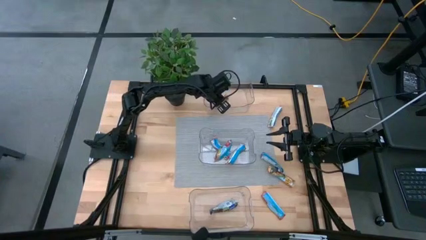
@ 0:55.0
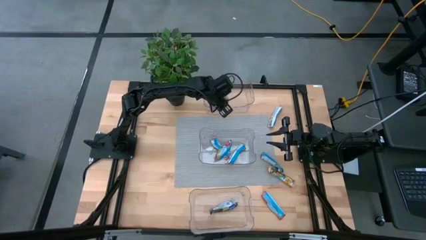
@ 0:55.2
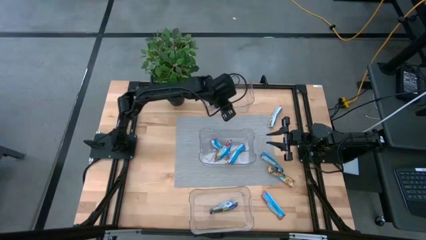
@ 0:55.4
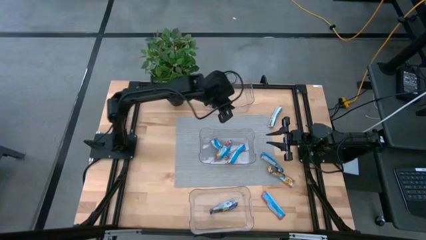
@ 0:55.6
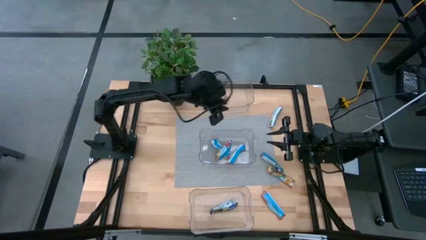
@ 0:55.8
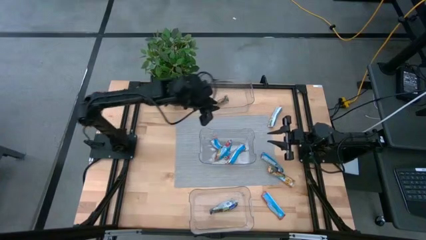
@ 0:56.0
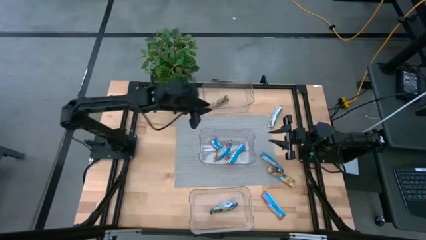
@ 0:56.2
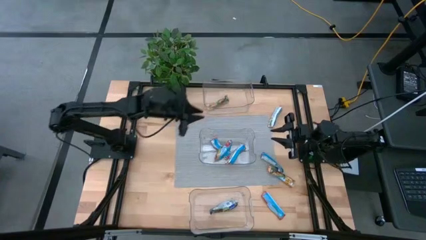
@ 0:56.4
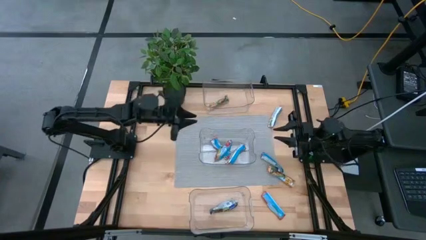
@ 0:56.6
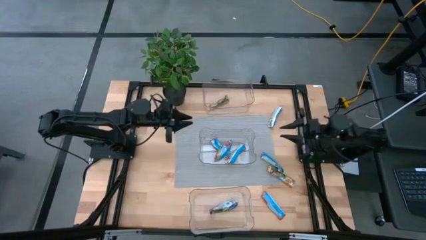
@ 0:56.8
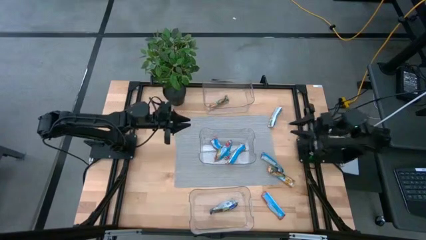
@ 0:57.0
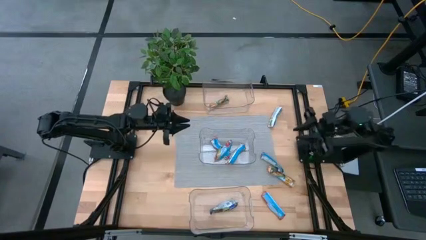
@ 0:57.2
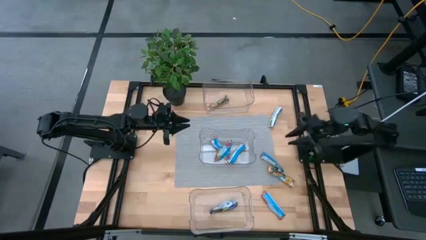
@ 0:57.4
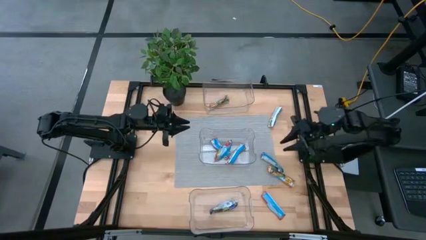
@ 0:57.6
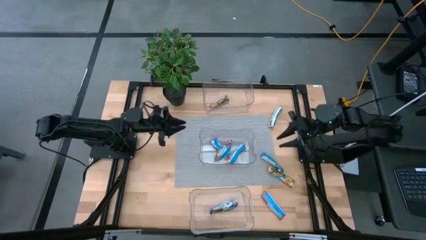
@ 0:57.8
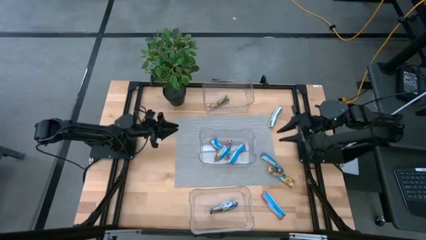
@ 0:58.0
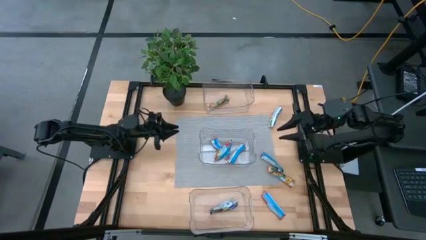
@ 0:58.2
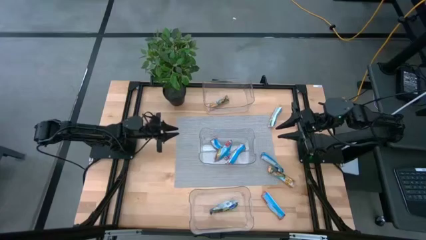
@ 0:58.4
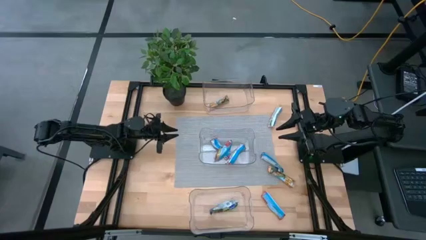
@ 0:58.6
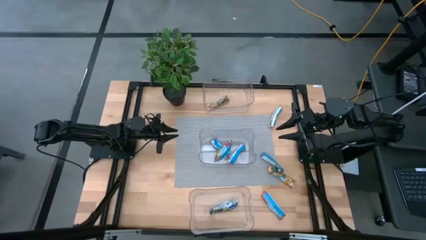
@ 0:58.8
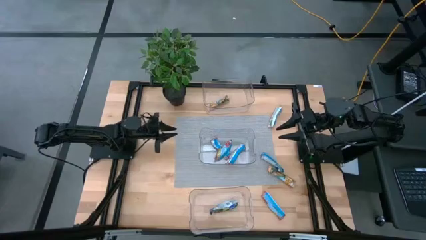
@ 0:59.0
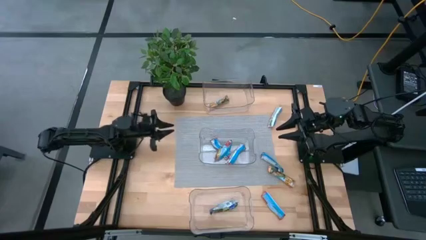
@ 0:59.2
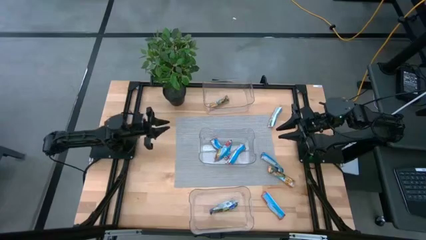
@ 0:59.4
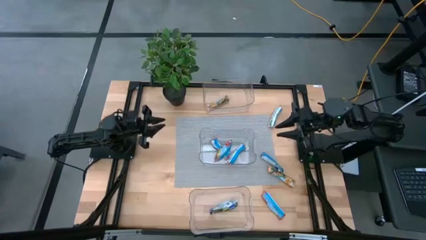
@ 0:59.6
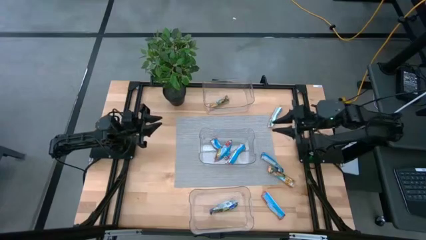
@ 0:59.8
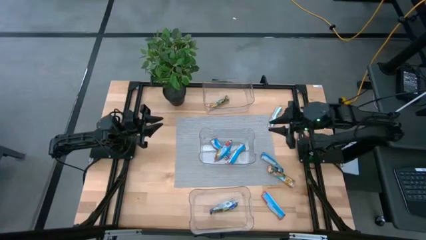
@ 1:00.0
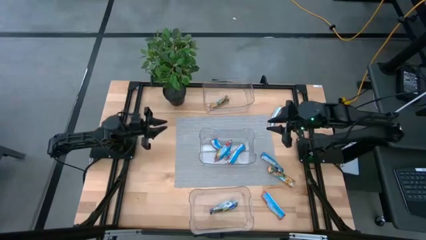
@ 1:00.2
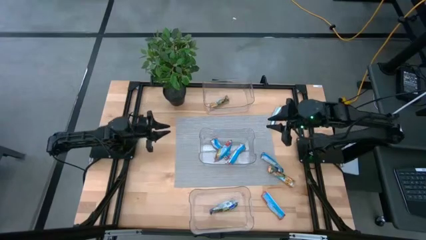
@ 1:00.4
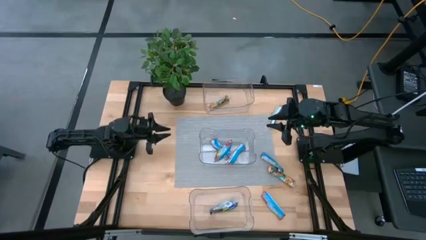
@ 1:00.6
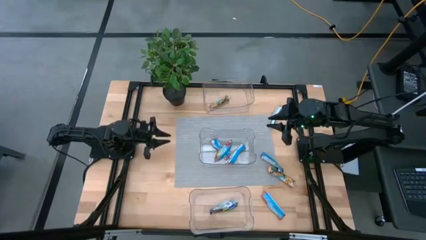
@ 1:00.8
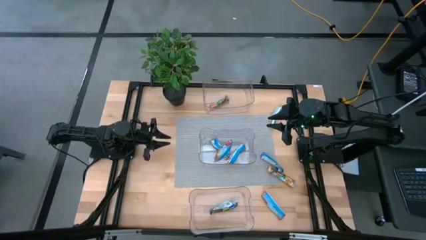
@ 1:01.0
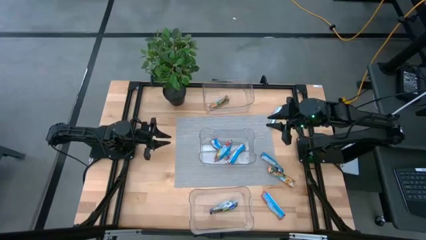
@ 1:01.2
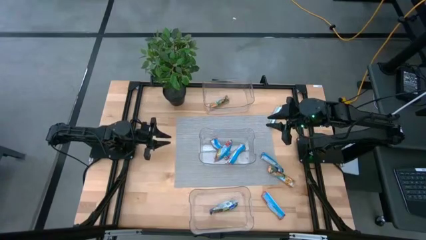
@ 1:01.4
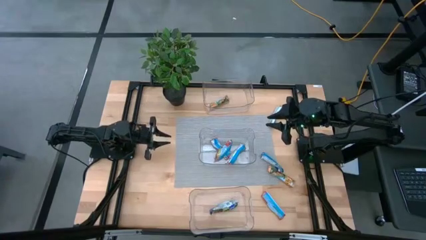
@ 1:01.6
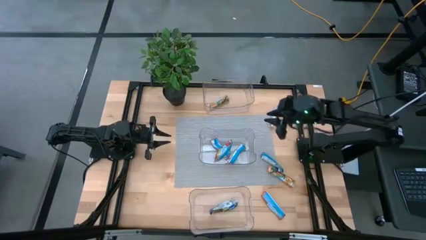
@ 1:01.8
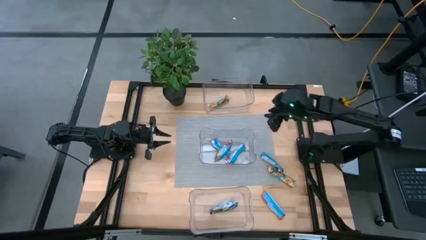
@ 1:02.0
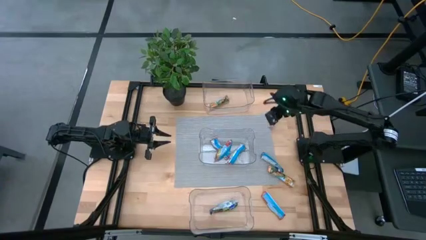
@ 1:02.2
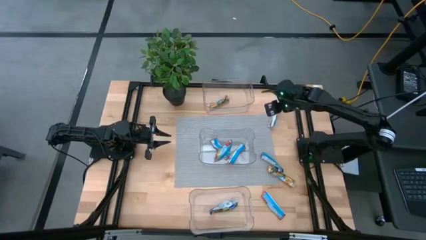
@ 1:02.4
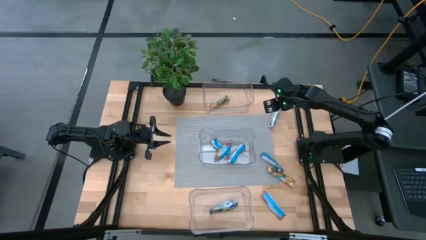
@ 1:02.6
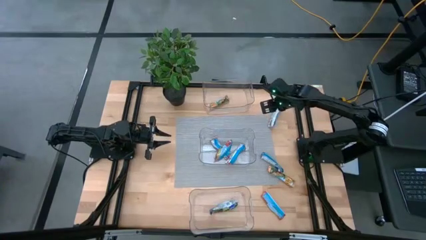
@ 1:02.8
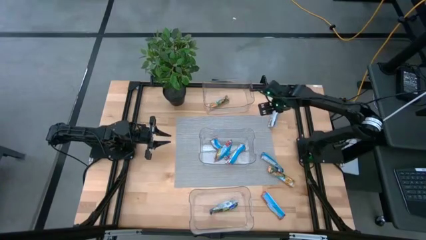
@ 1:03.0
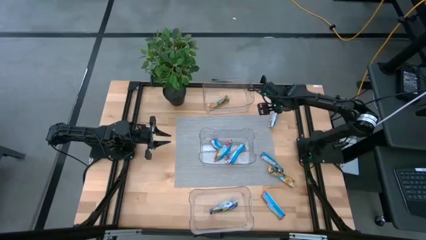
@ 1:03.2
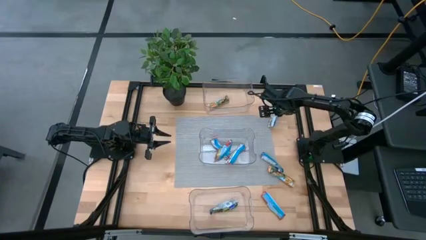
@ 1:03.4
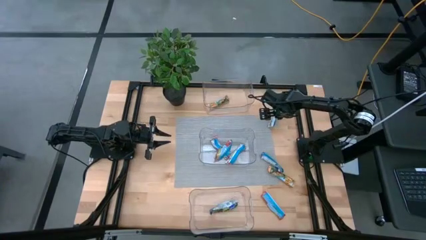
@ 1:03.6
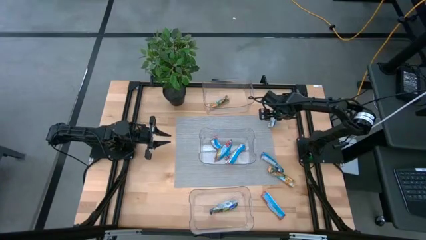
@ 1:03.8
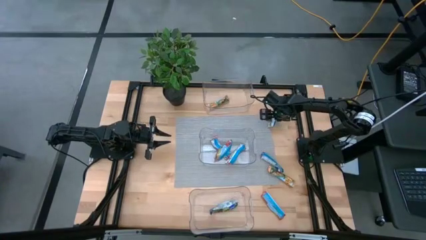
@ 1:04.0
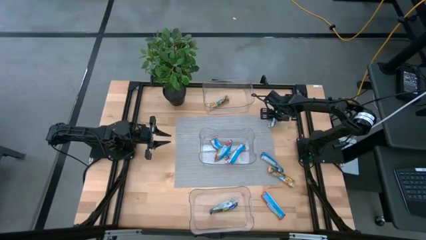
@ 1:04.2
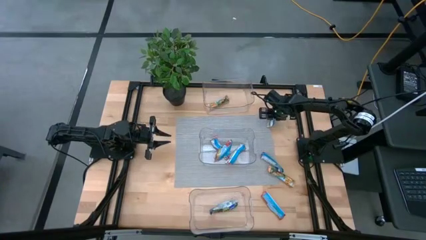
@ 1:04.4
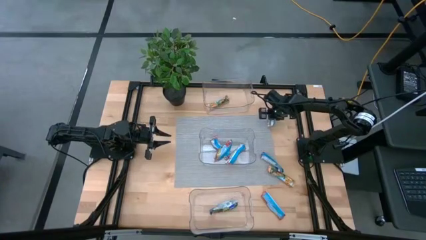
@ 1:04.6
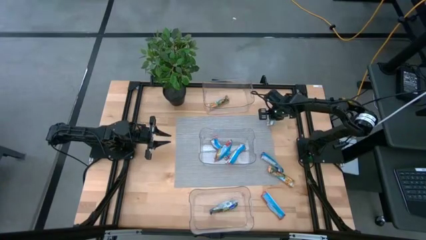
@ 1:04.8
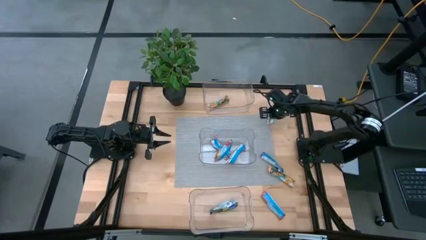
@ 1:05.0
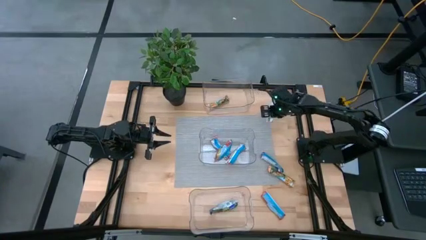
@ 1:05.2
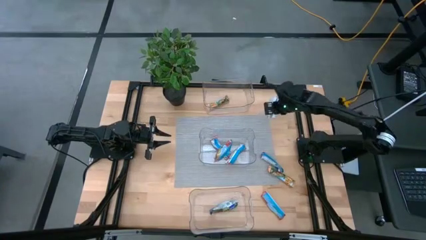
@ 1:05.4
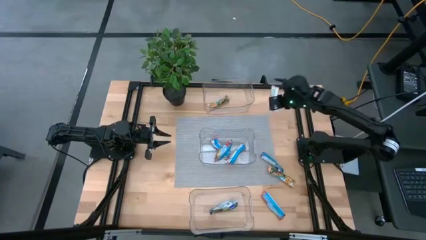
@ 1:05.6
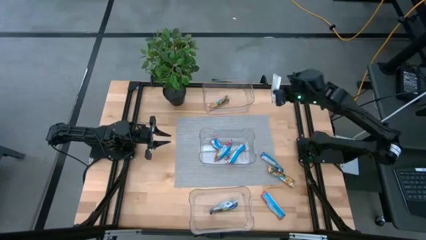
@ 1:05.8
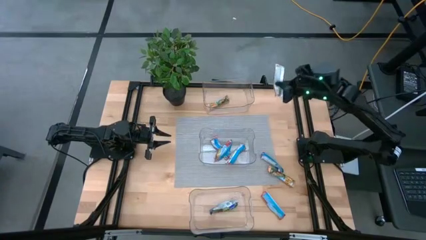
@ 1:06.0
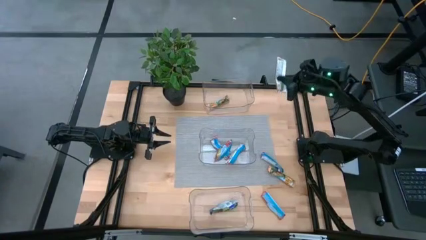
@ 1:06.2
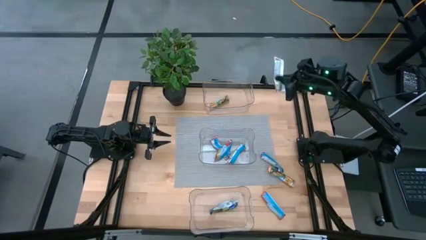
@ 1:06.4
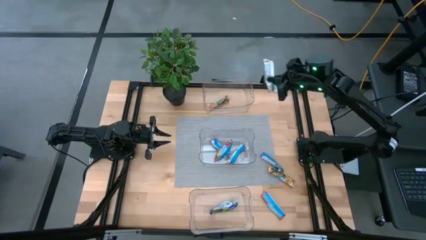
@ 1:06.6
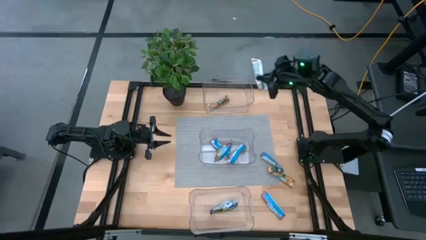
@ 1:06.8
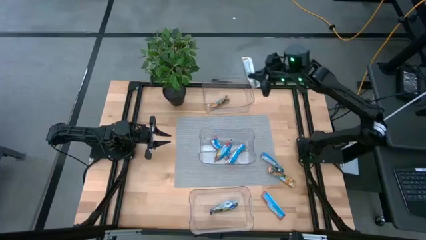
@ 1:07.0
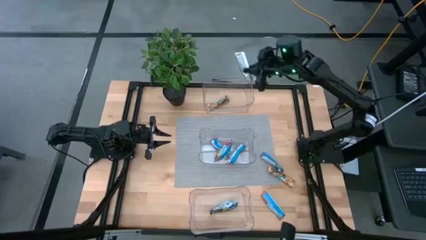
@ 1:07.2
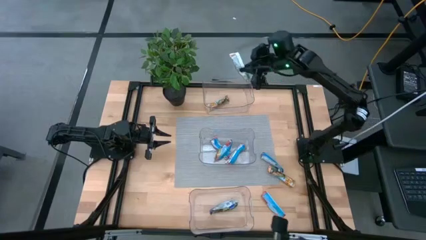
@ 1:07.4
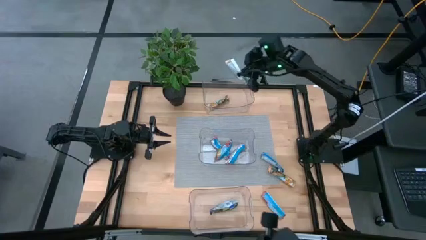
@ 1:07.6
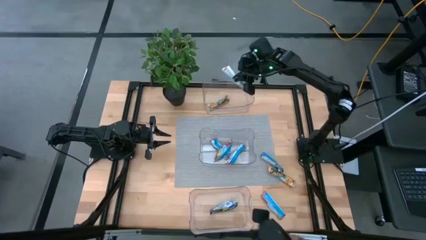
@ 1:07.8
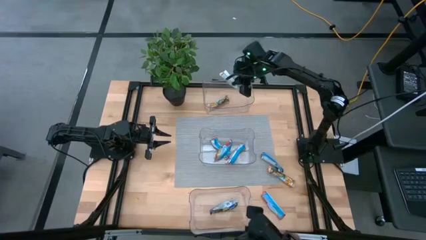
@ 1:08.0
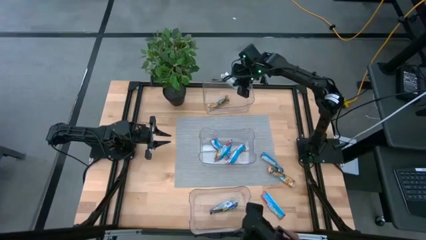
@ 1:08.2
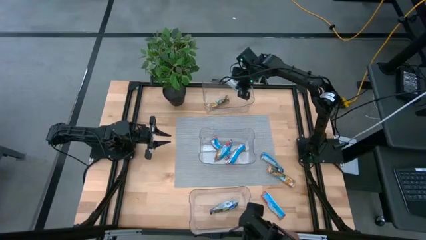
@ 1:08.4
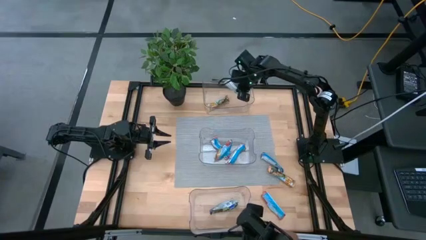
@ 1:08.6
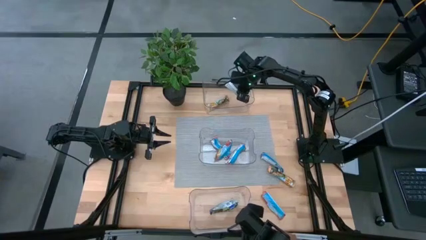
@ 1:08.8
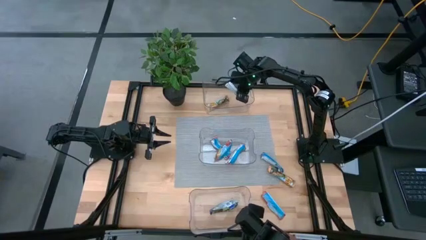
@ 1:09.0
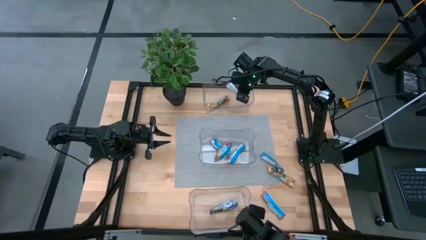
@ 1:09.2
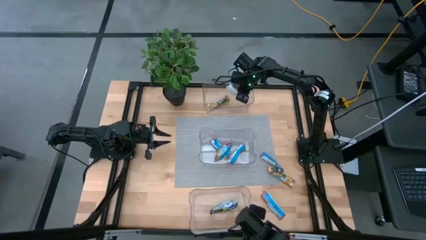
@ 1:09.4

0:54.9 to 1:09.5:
Task: Pick and place Granola Bars by type
Put the orange granola bar into the top transparent bin
